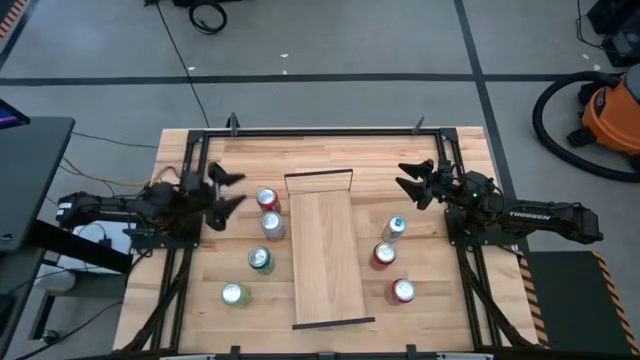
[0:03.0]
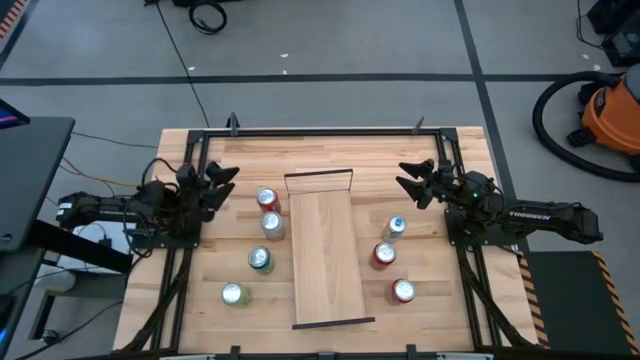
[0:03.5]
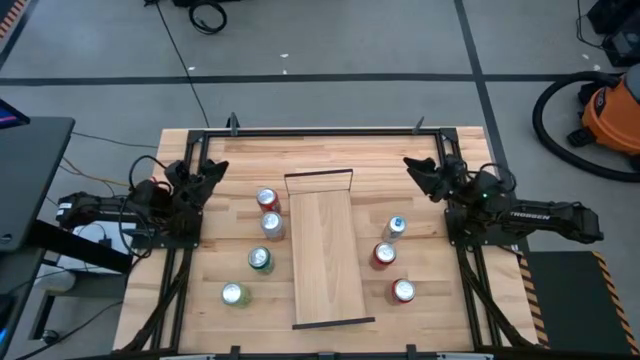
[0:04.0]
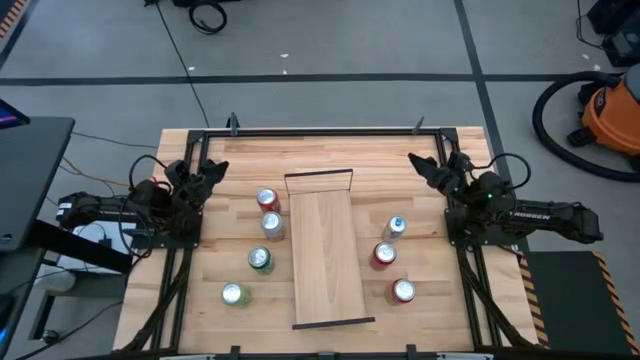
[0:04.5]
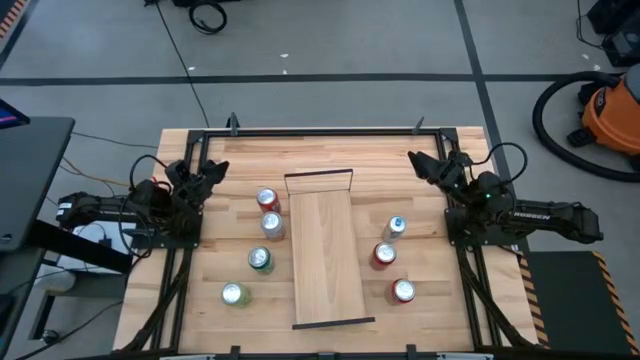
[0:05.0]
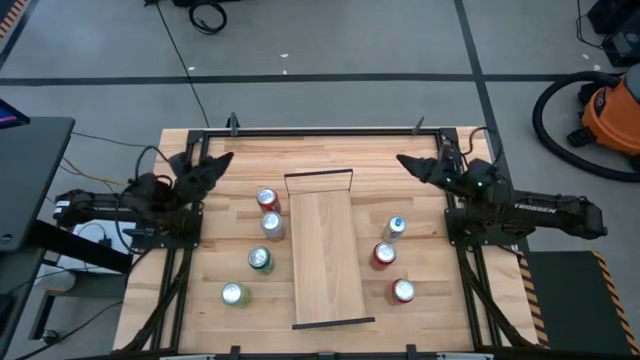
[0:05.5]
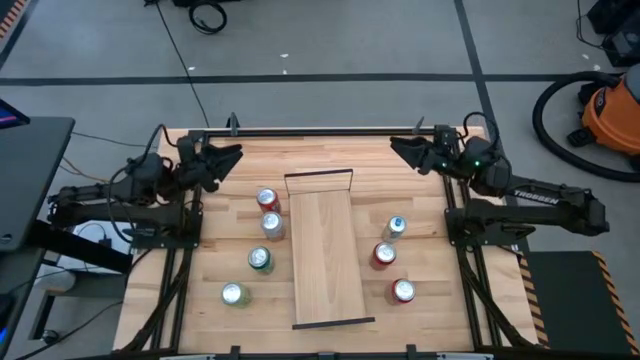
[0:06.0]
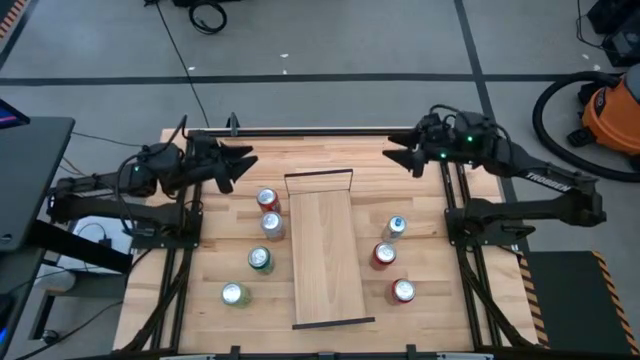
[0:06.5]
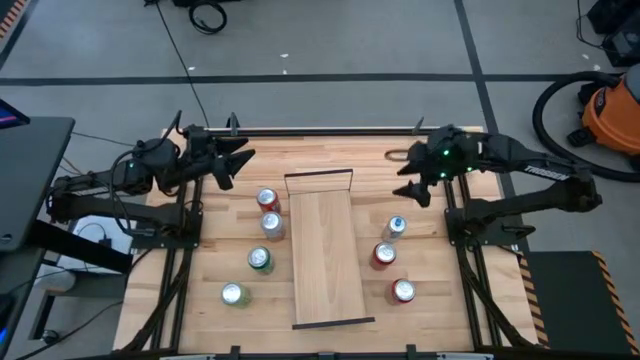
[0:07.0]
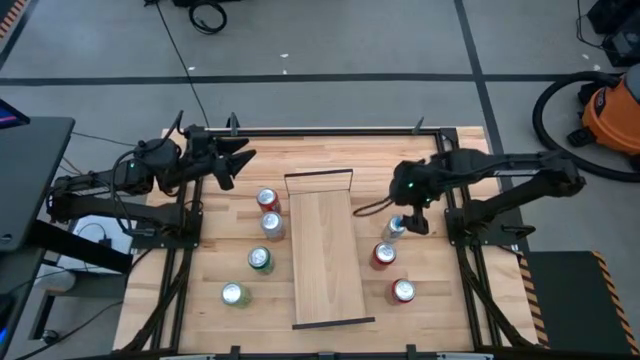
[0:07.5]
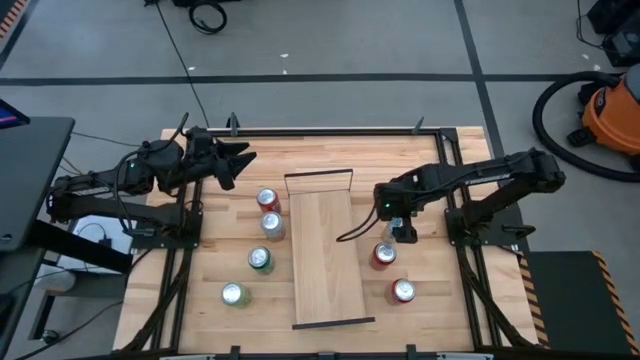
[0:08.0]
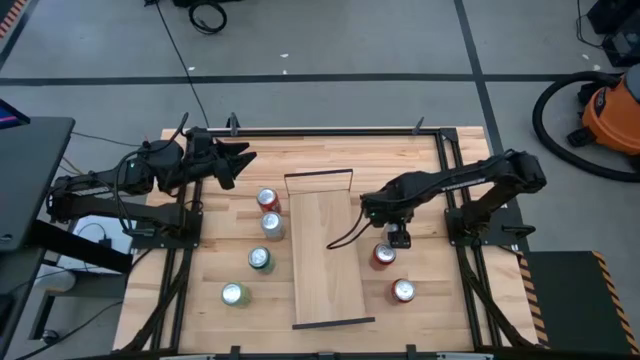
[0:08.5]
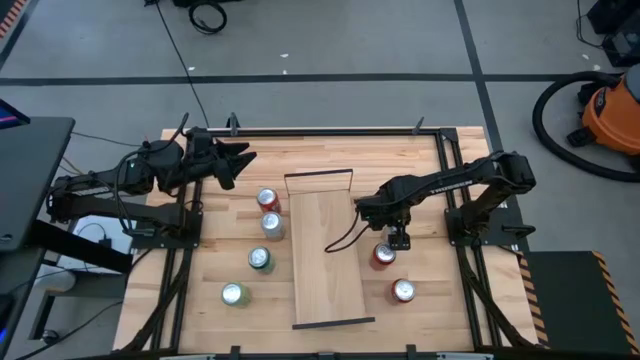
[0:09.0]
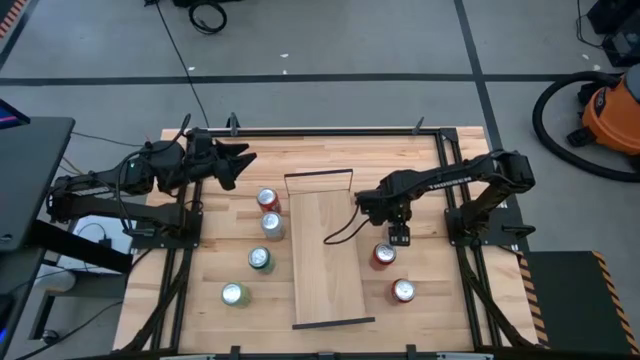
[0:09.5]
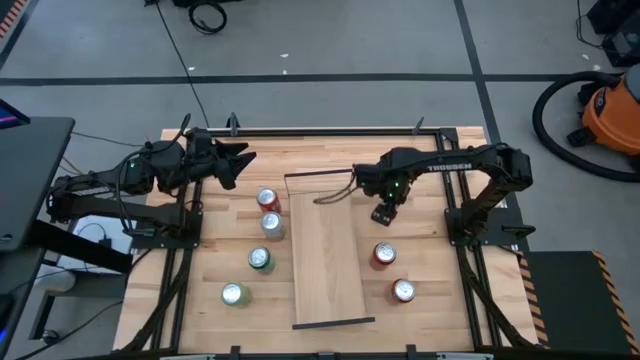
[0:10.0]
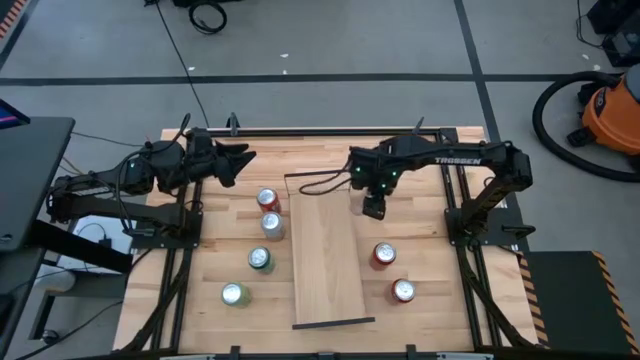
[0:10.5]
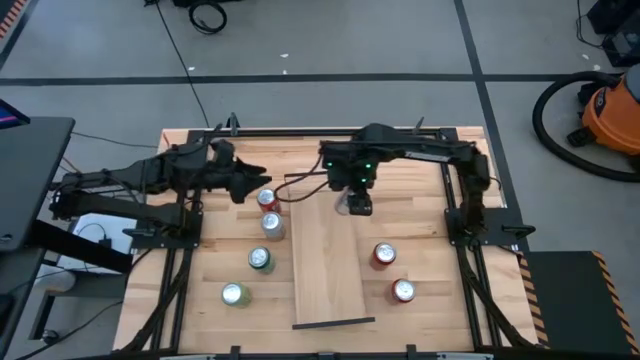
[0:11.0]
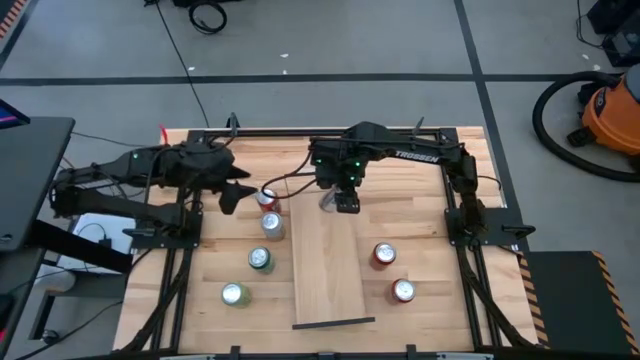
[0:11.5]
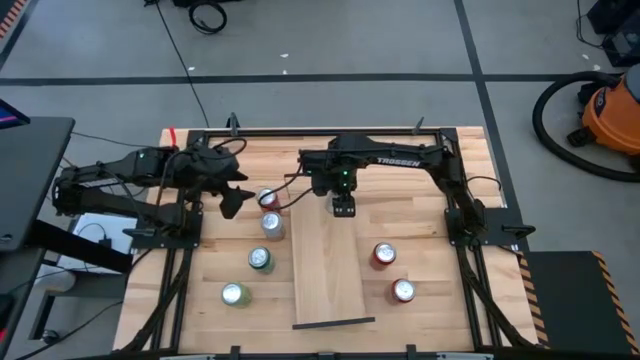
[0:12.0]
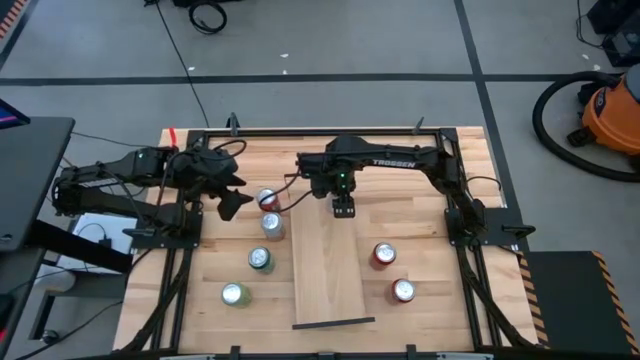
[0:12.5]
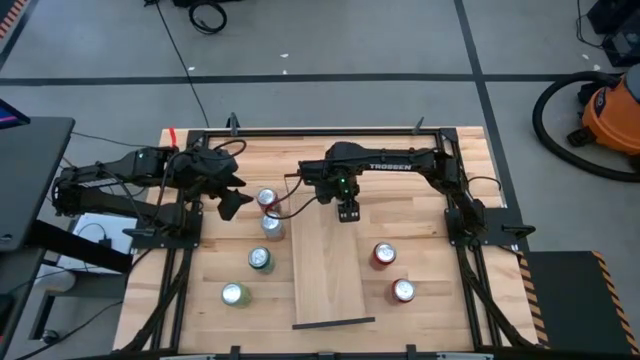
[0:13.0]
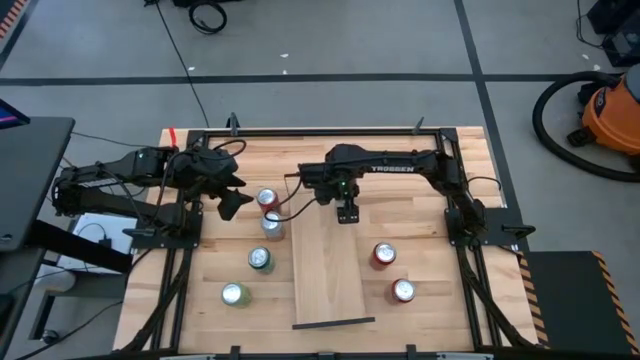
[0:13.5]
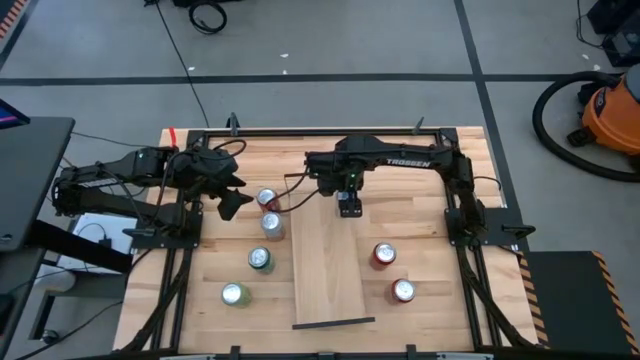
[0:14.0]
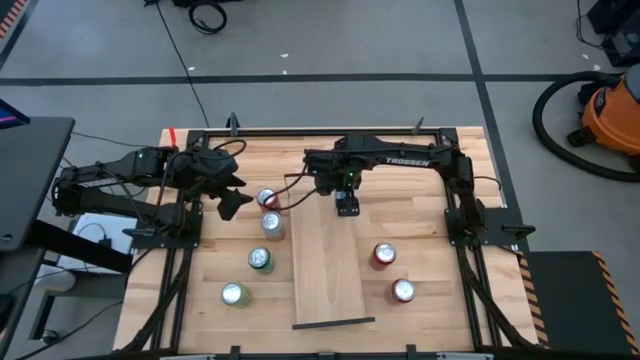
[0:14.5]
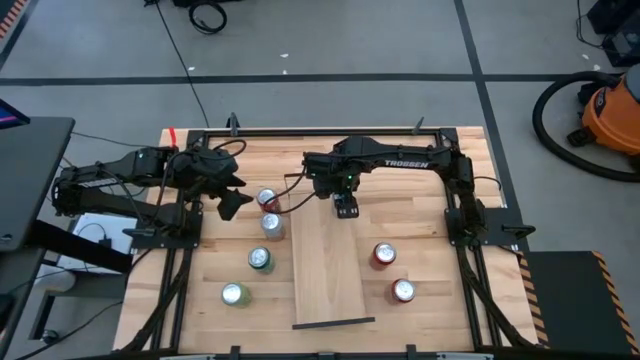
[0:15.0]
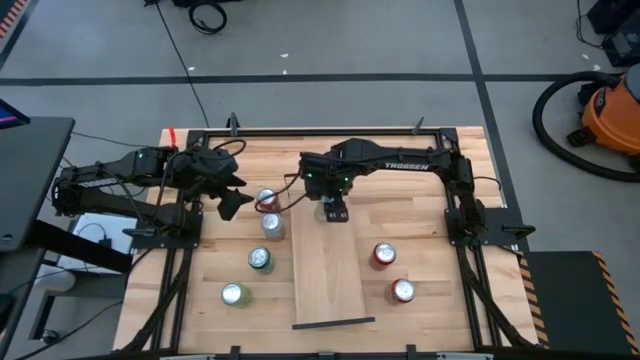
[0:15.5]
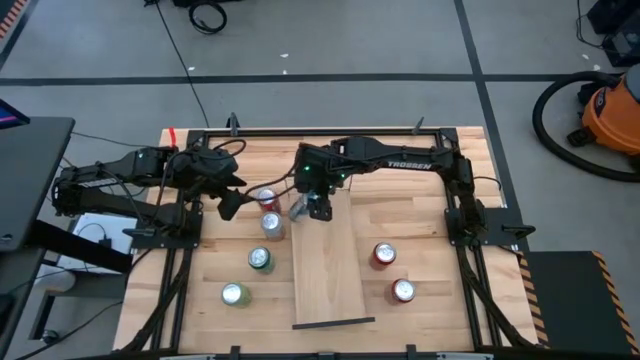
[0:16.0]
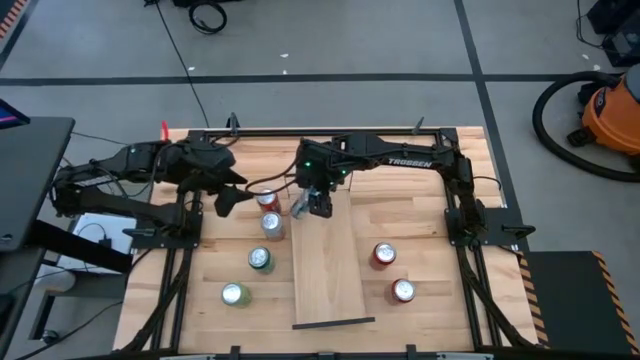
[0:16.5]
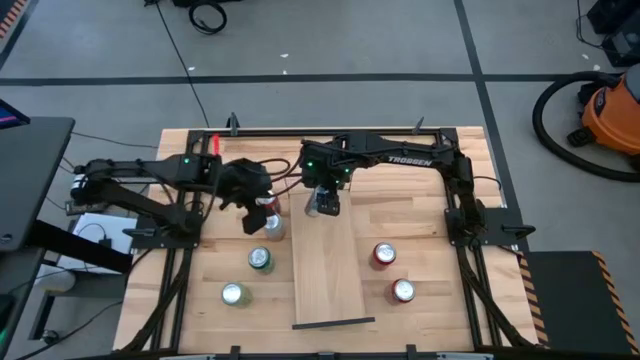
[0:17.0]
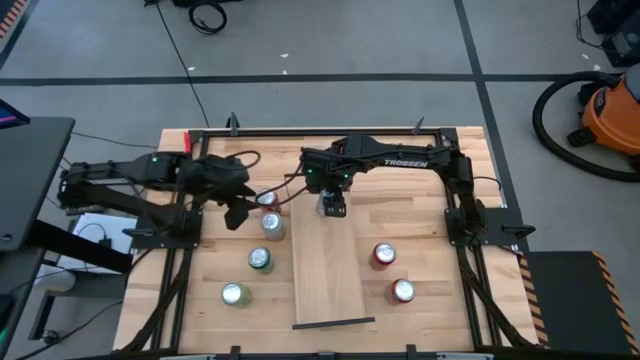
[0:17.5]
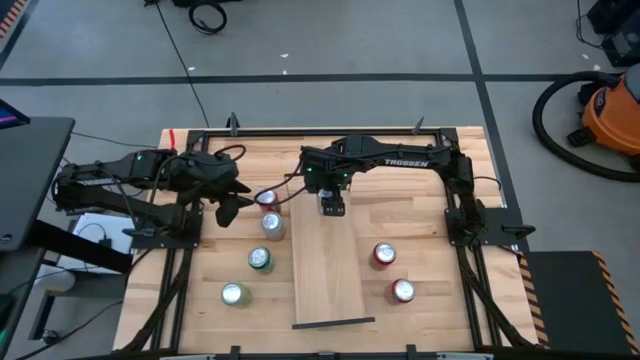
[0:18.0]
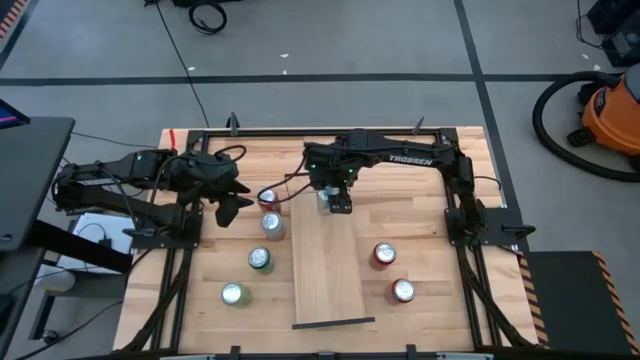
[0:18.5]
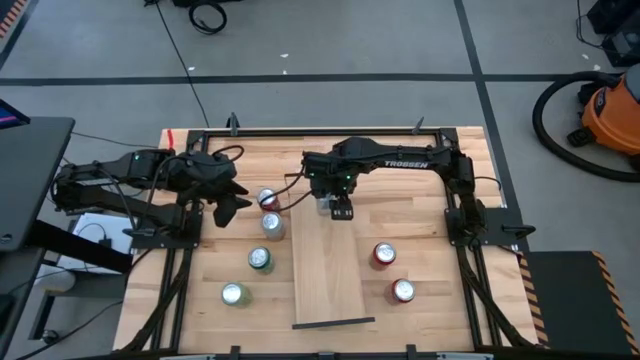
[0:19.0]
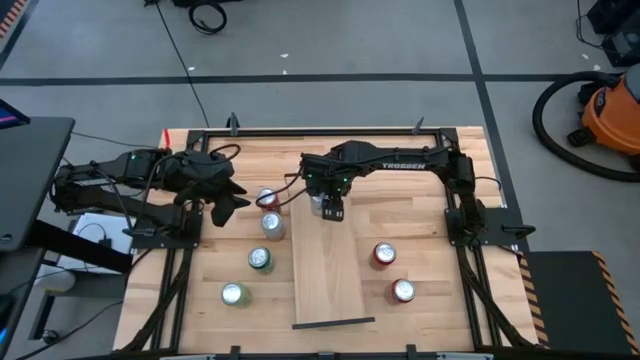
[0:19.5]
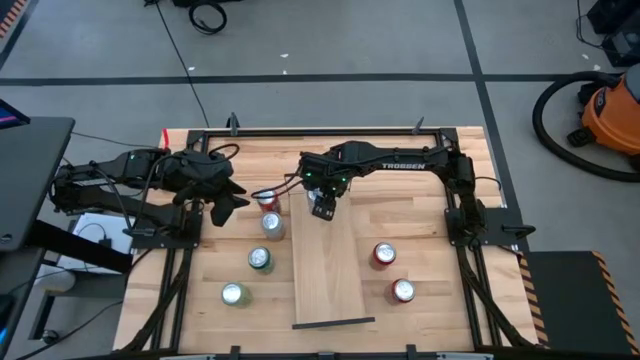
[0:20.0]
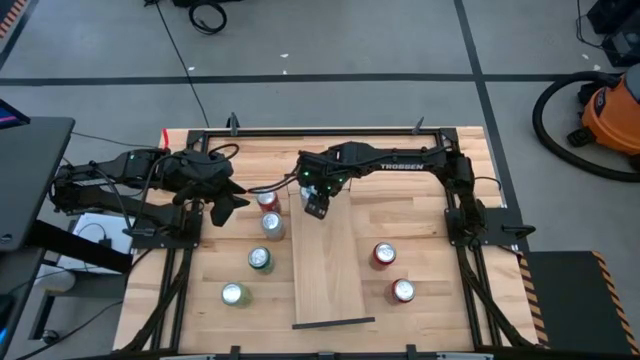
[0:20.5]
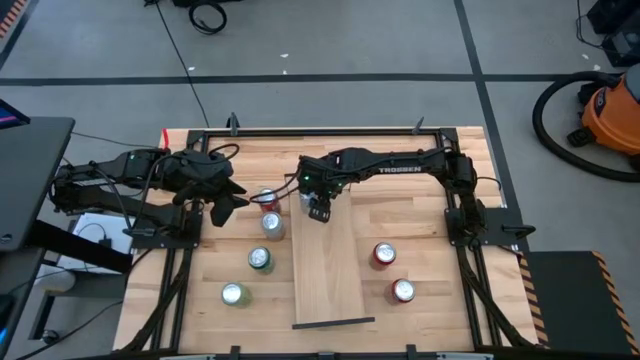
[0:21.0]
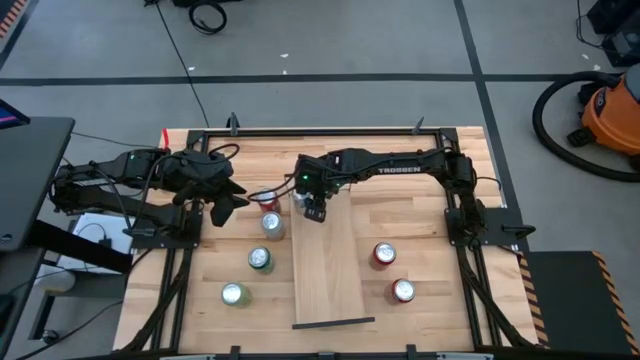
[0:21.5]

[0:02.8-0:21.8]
Task: Place canned beverage on shelf
Put the white and blue soda can on the shelf
